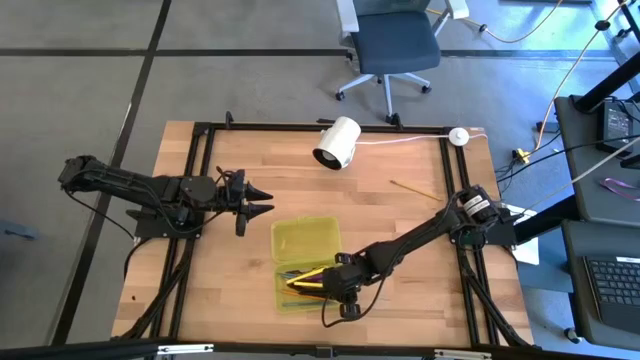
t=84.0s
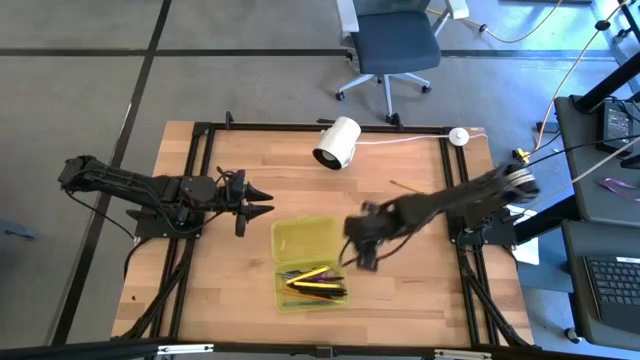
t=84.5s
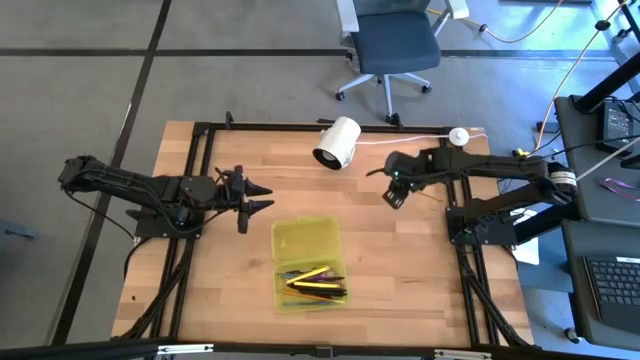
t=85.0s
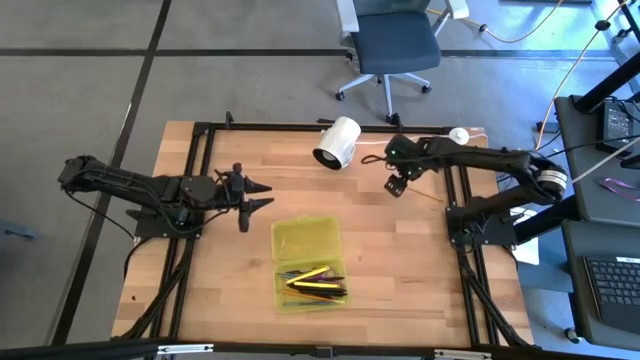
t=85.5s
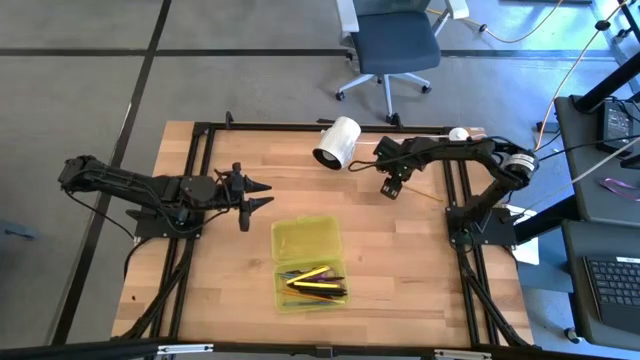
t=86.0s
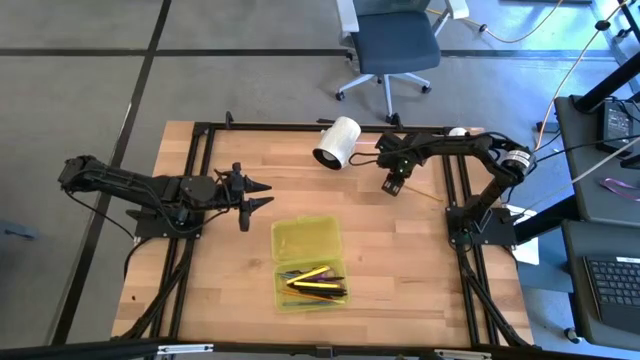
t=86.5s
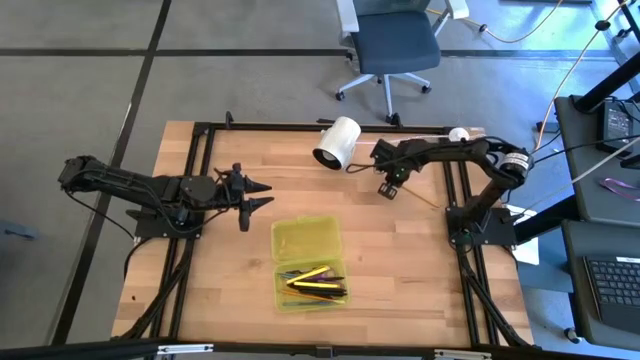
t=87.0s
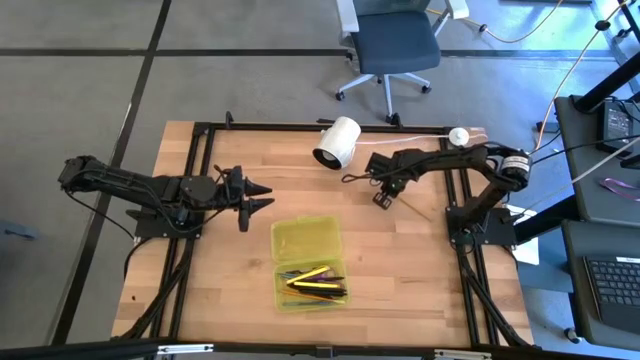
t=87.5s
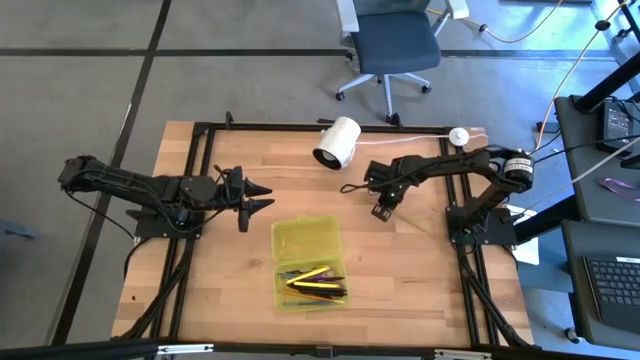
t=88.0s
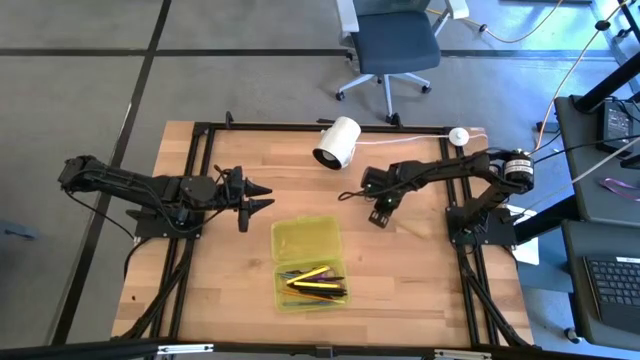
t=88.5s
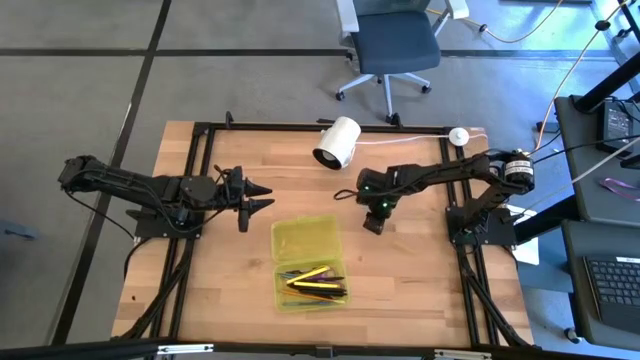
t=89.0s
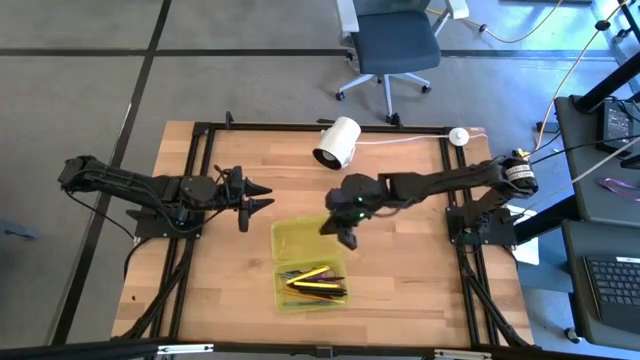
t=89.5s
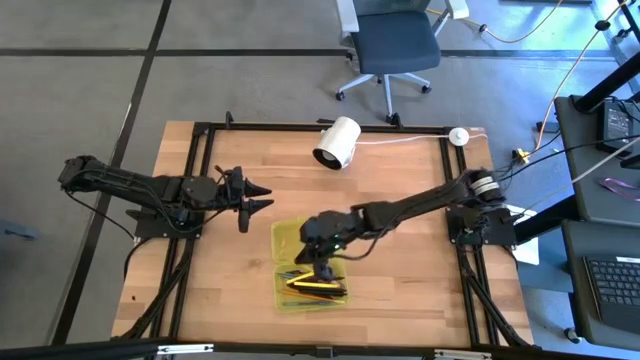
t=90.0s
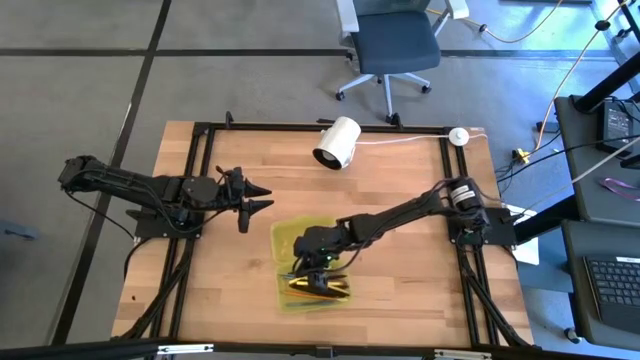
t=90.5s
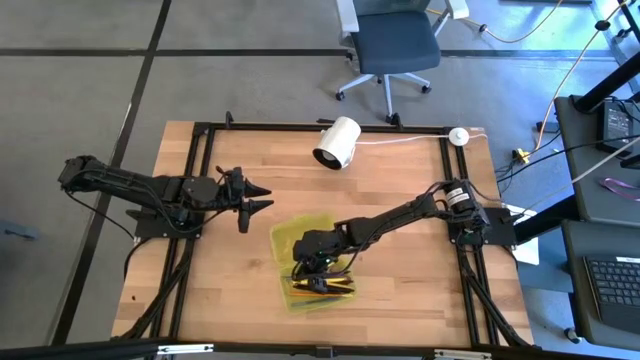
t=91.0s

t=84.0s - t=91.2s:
Task: Pick & place school supplies into a supply box
Put the yellow pencil into the yellow supply box

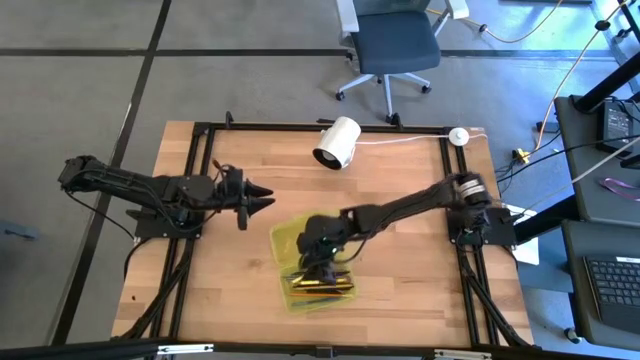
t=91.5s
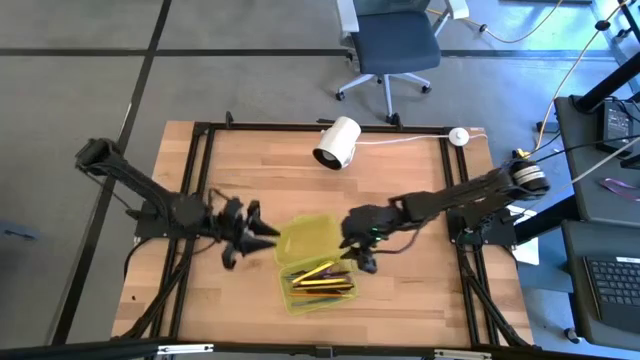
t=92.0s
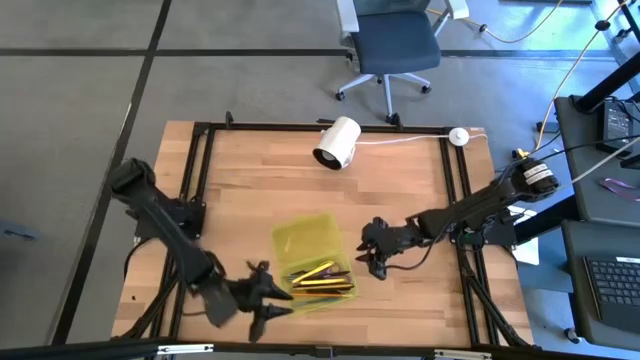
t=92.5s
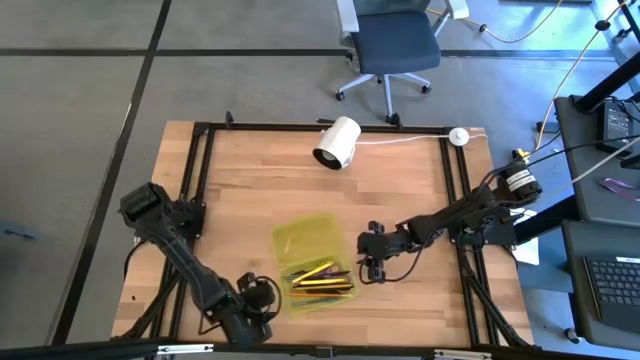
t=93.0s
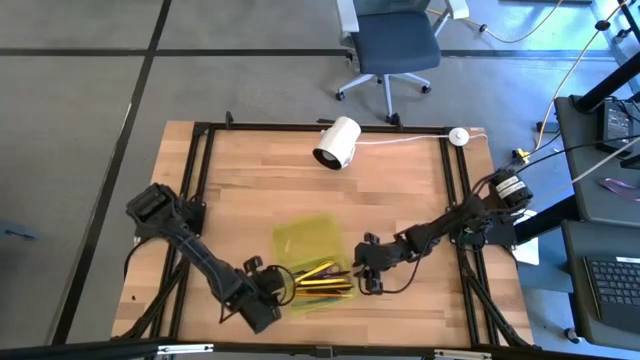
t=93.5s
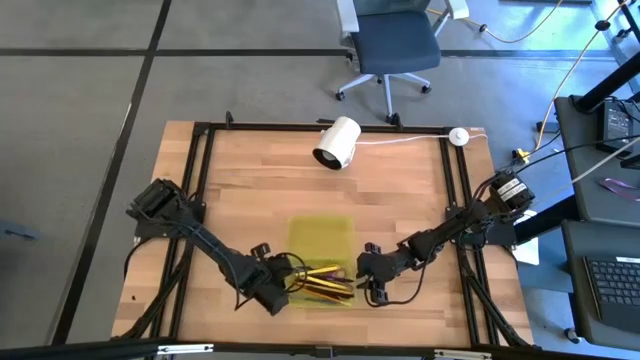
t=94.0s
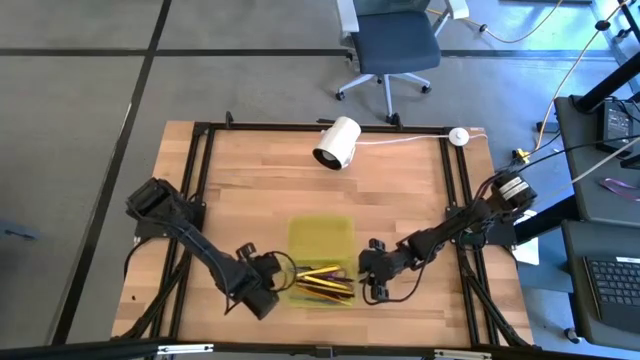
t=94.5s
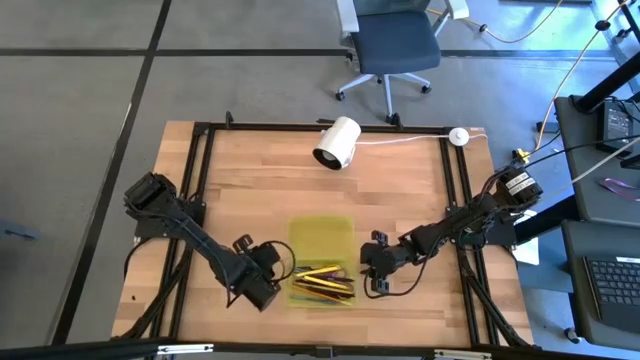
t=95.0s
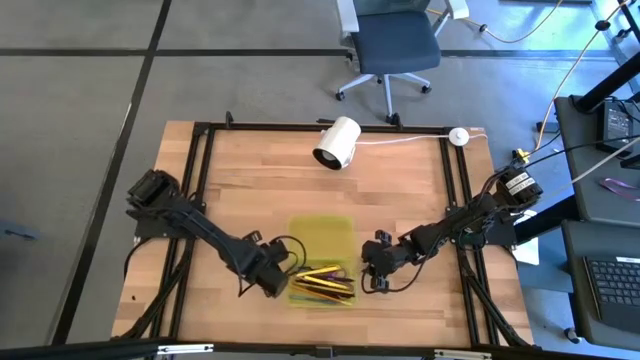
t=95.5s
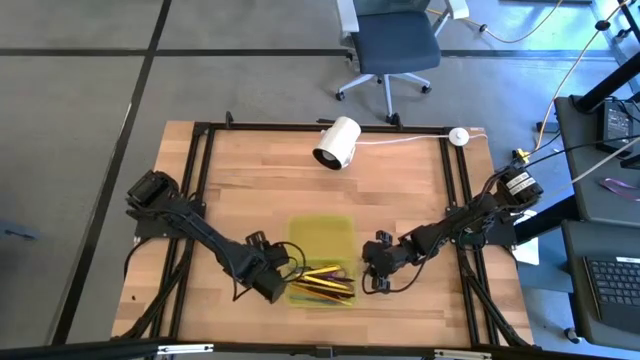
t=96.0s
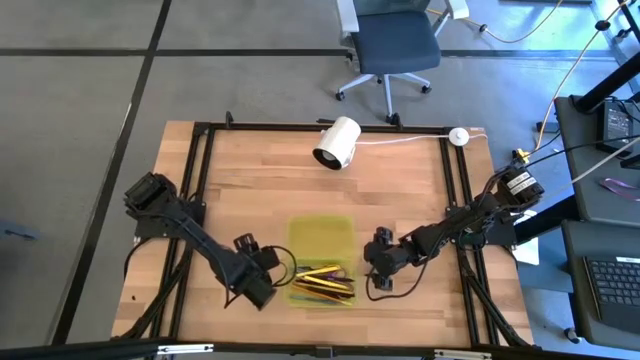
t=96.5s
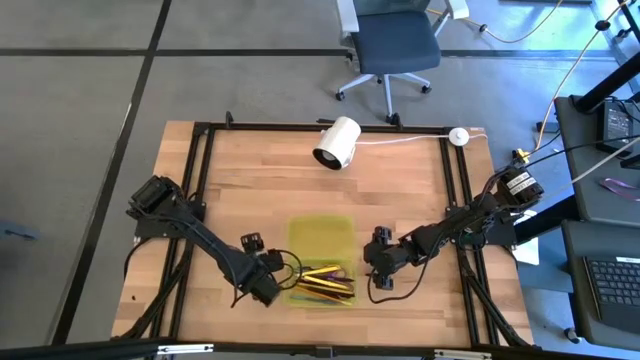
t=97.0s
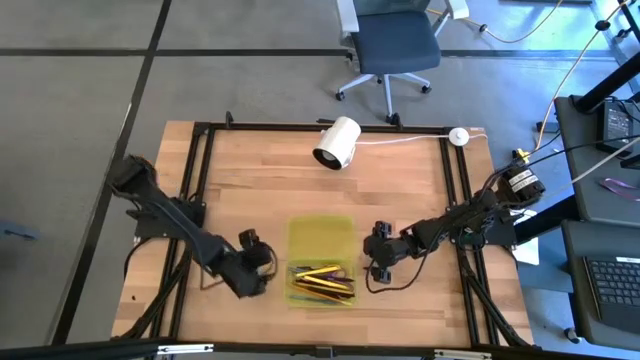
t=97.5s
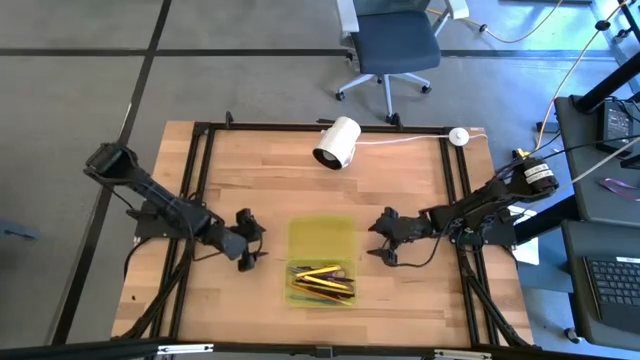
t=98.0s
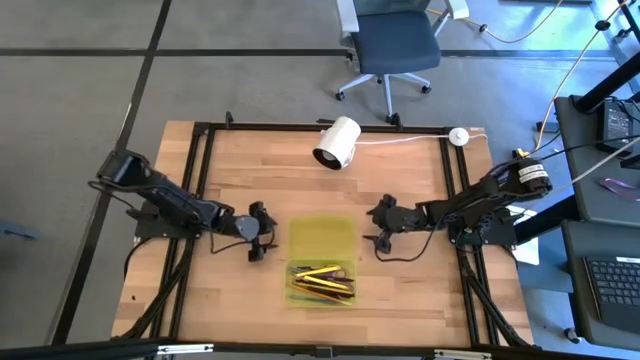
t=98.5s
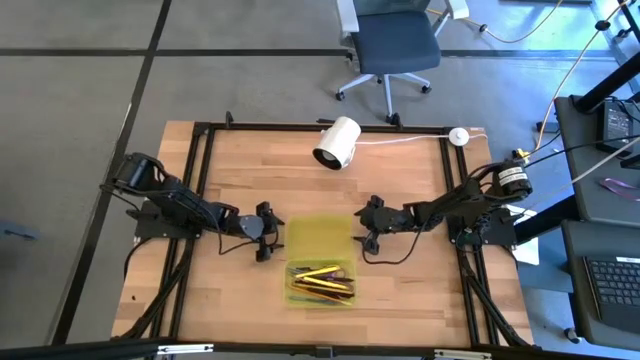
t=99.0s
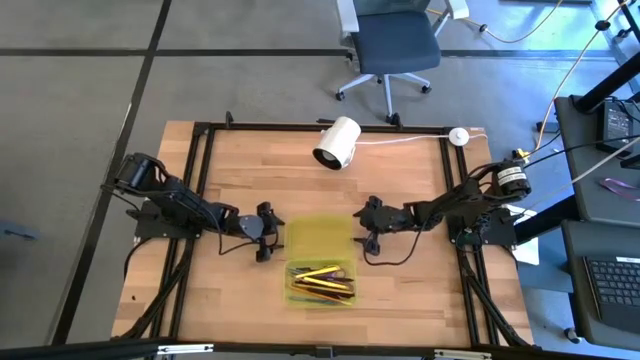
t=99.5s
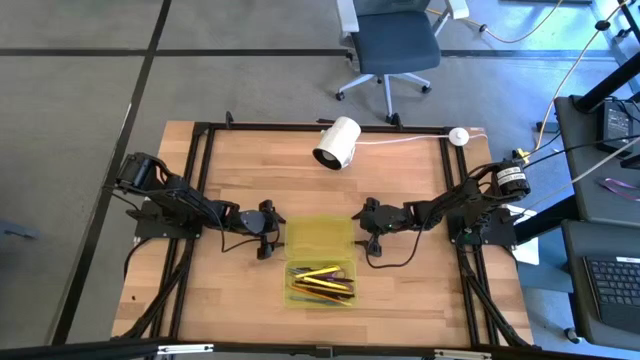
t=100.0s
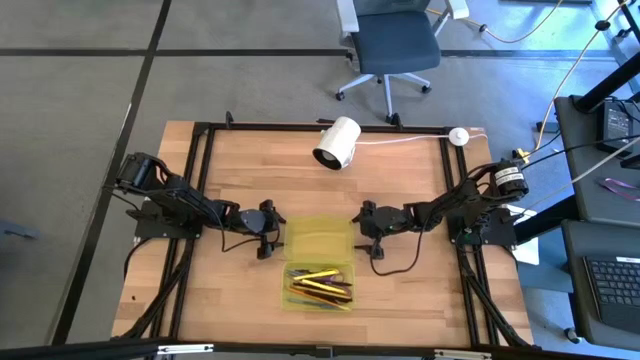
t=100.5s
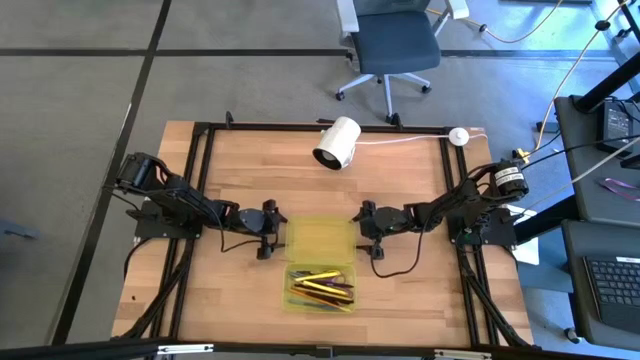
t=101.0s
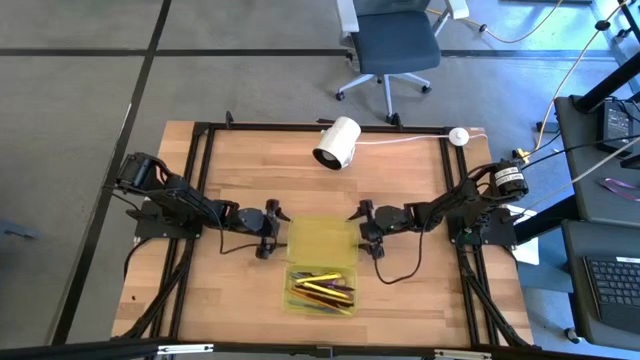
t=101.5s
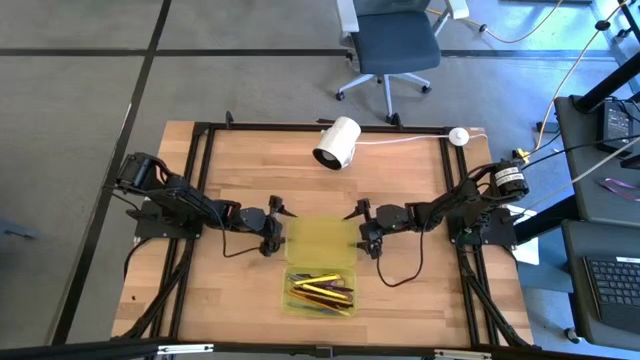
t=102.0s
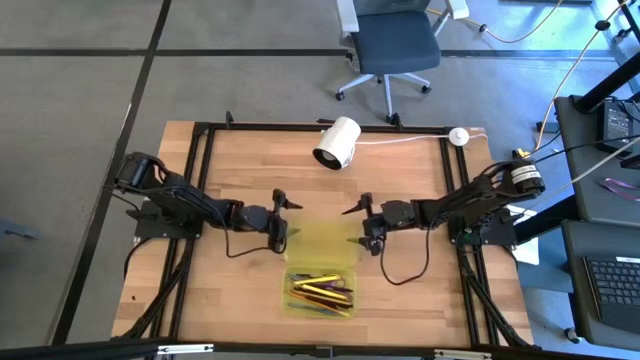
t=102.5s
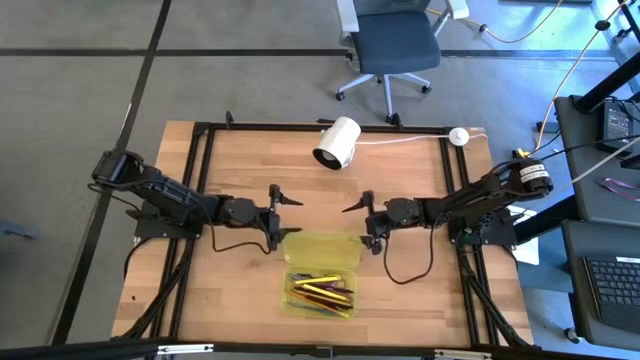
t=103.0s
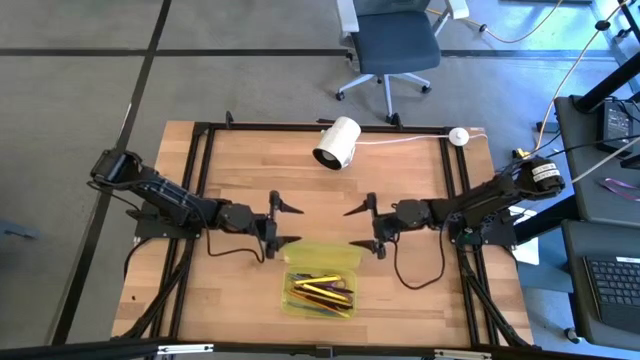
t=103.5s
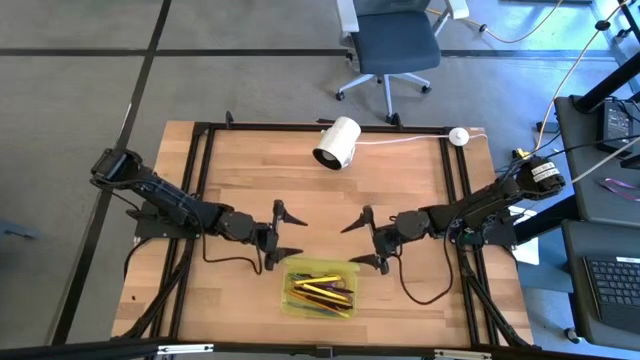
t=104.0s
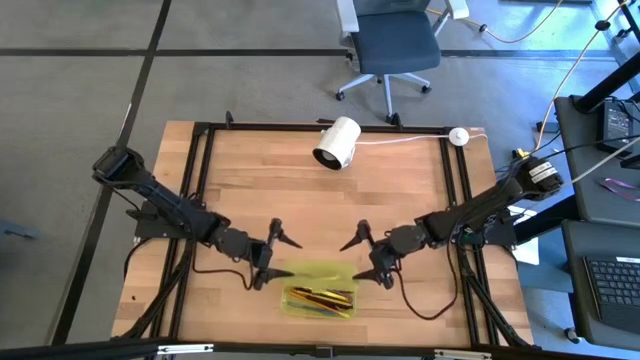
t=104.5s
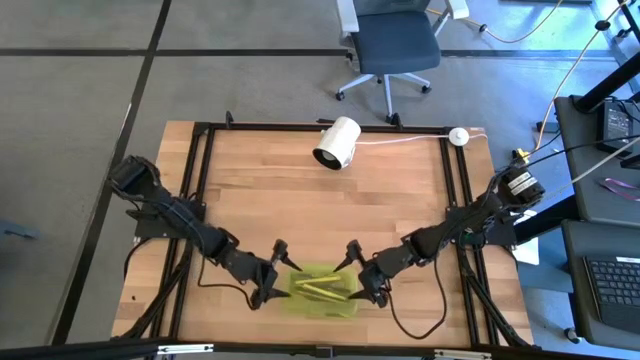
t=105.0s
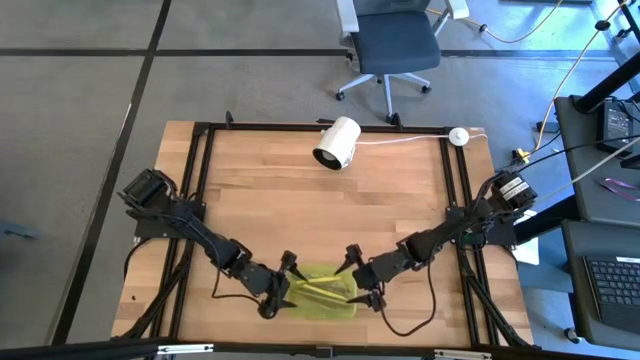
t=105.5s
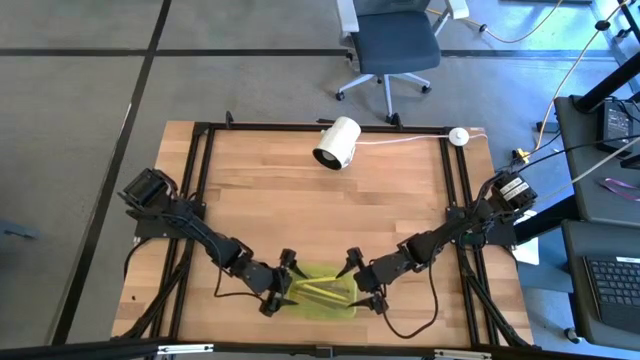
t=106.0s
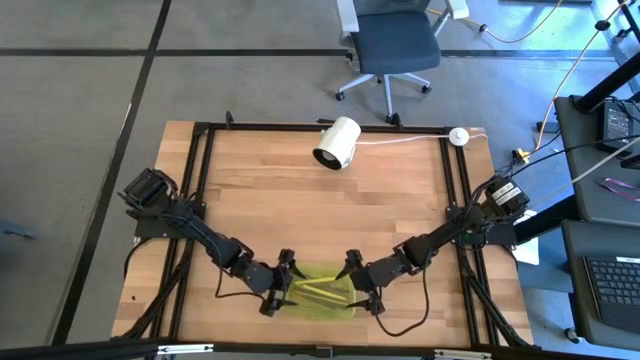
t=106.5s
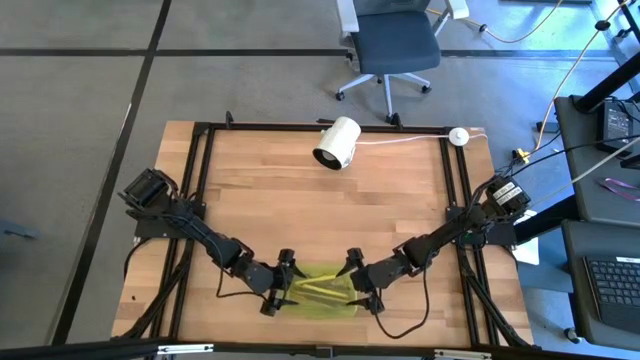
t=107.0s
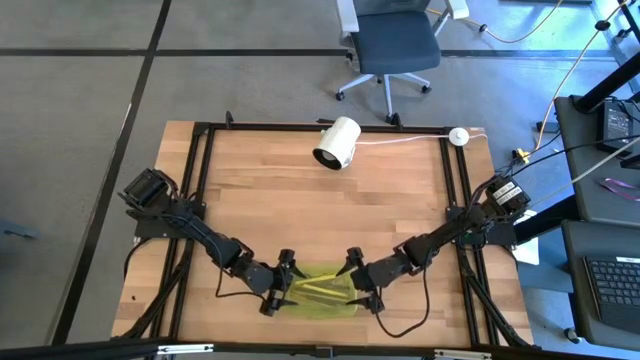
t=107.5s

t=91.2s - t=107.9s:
Close the yellow supply box
